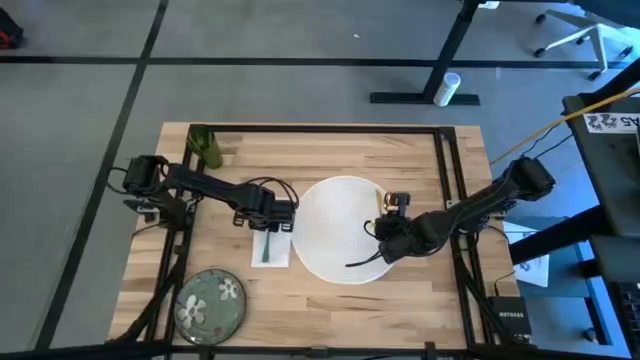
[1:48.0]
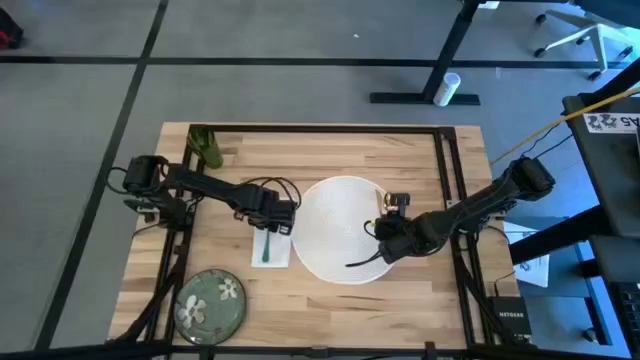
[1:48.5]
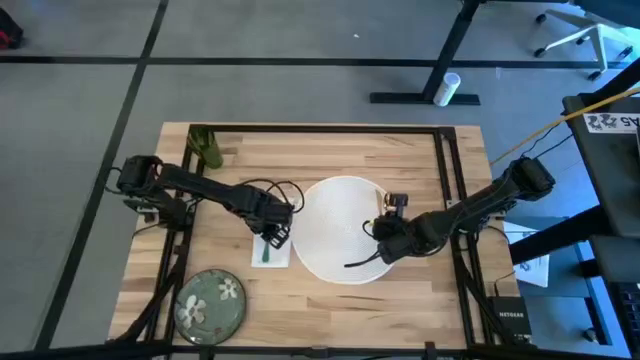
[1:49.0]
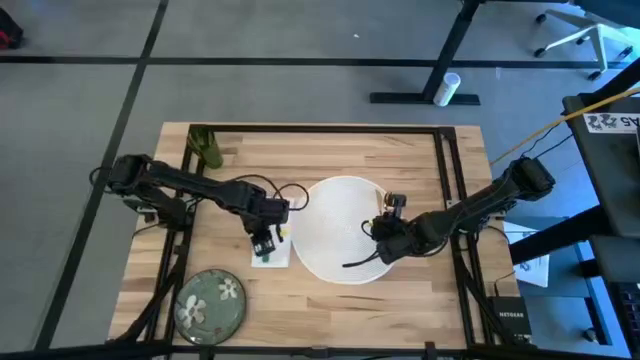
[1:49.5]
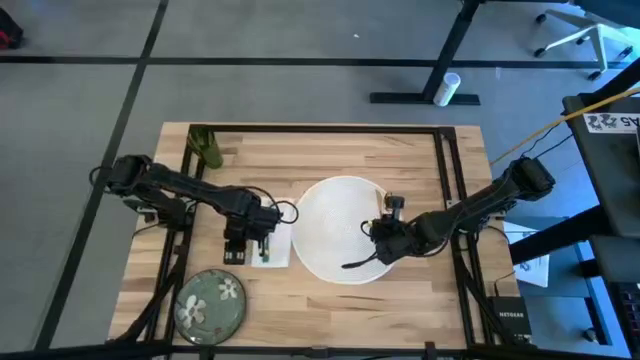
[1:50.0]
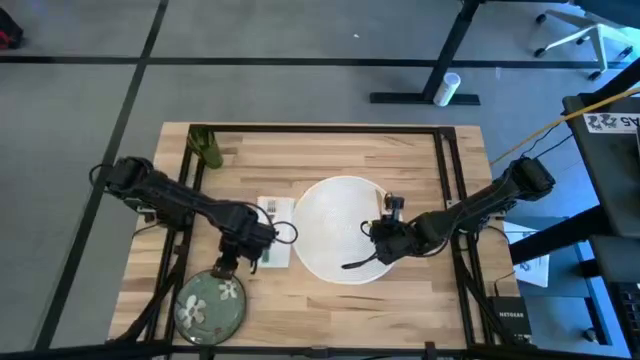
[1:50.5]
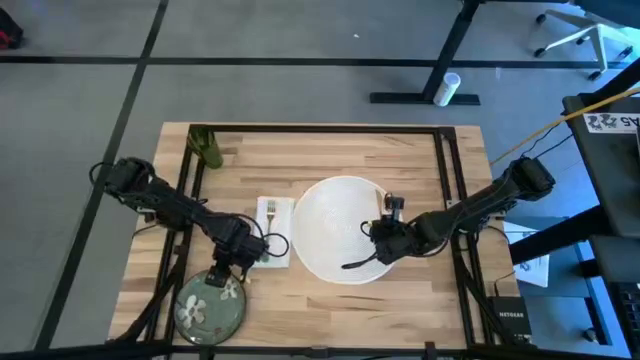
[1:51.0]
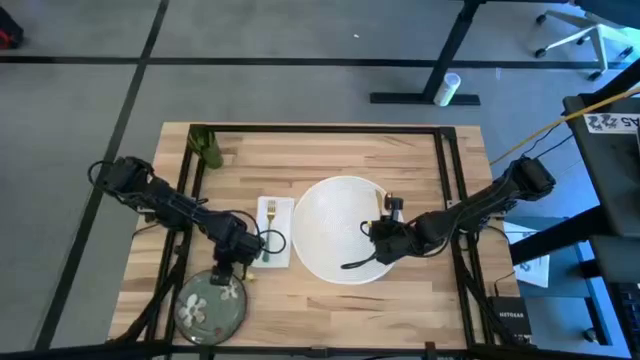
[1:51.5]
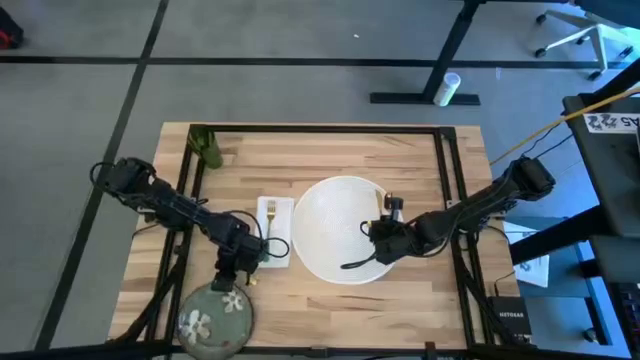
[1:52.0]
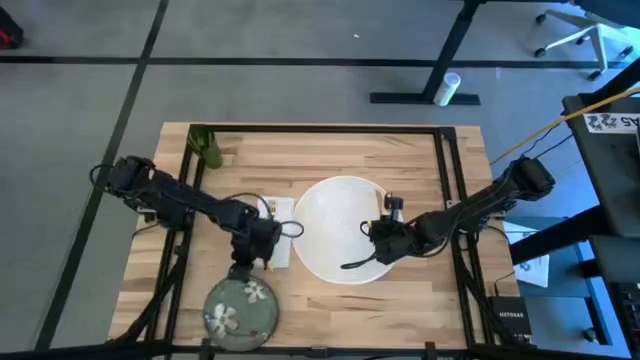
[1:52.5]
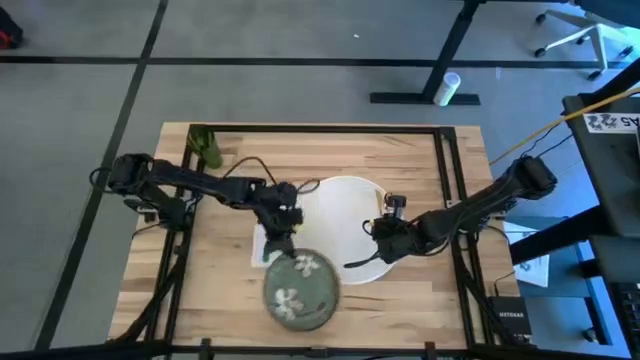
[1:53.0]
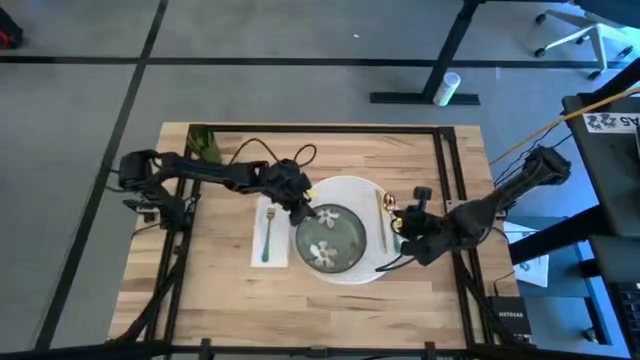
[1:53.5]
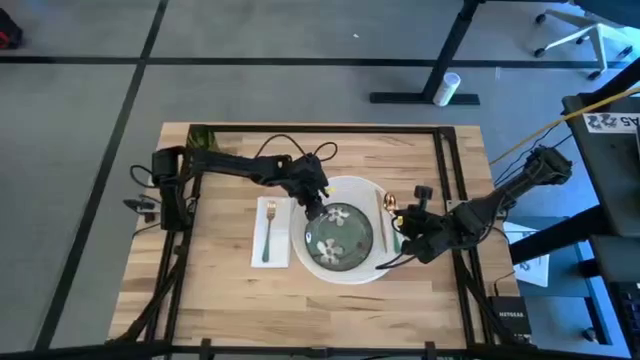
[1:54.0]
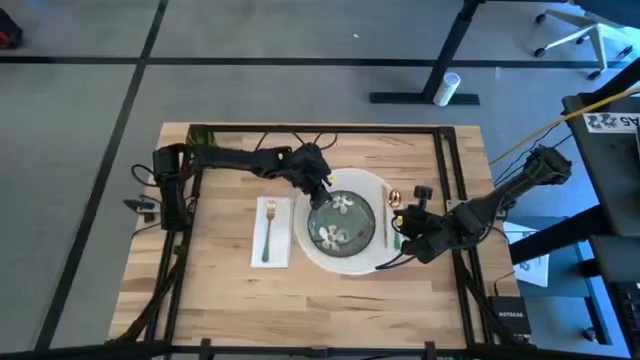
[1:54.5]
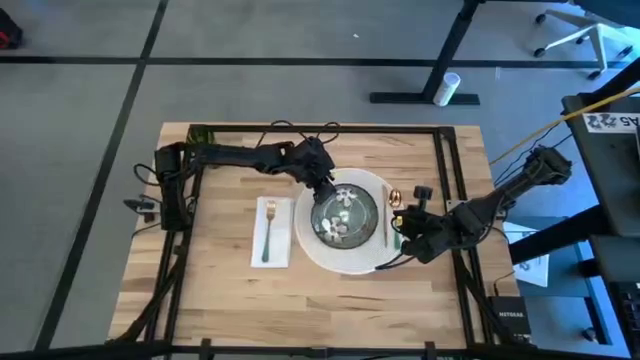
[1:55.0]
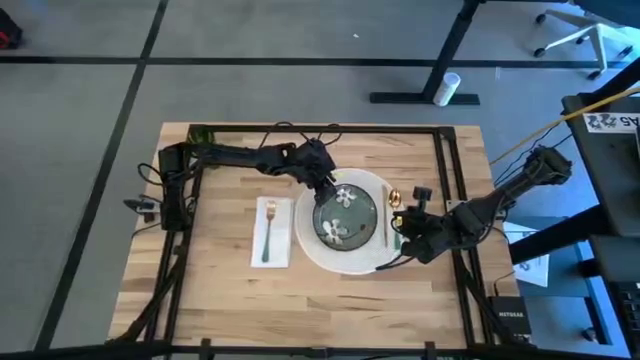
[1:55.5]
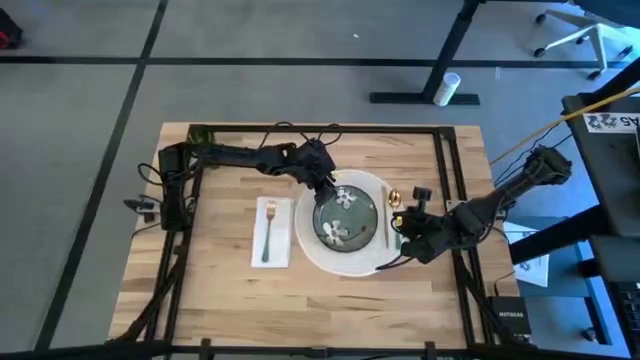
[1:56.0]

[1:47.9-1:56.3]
Task: Set table place
Put the green plate on the white table mat to the left of the gold table knife

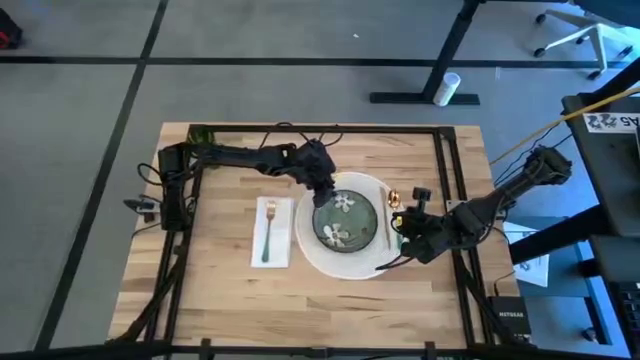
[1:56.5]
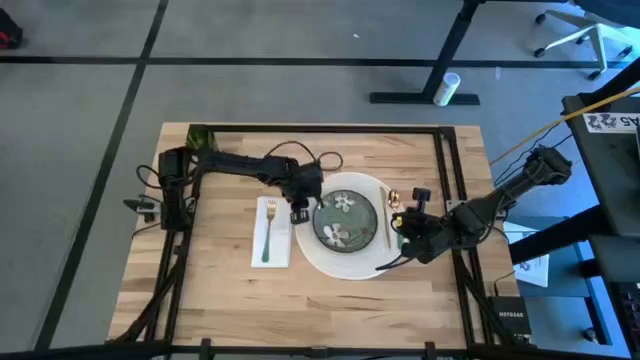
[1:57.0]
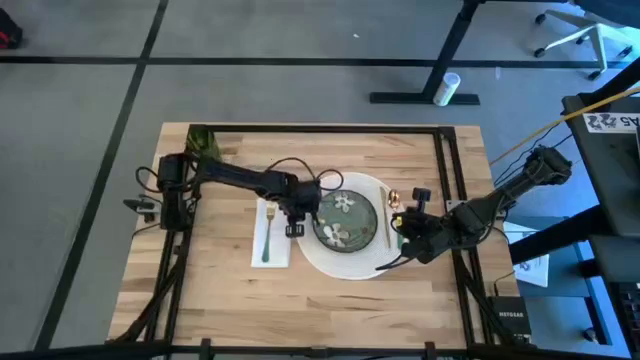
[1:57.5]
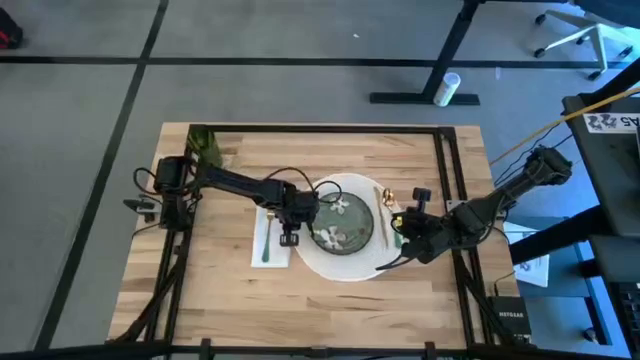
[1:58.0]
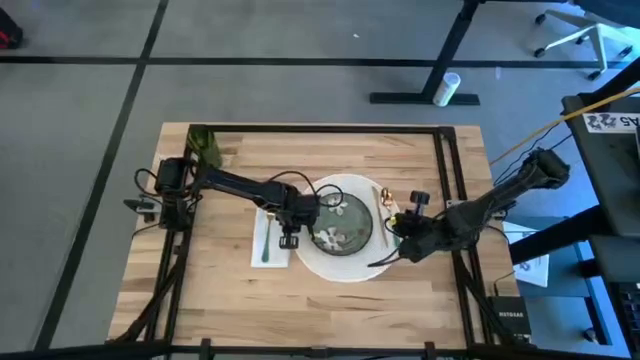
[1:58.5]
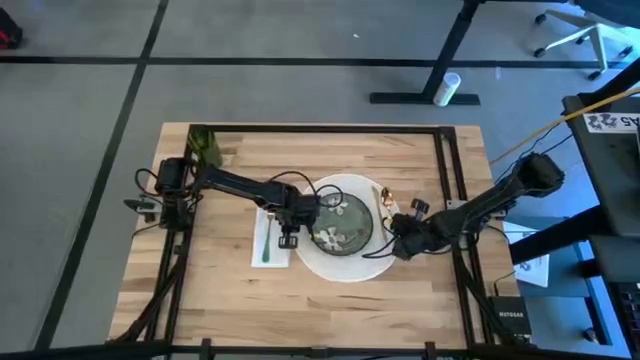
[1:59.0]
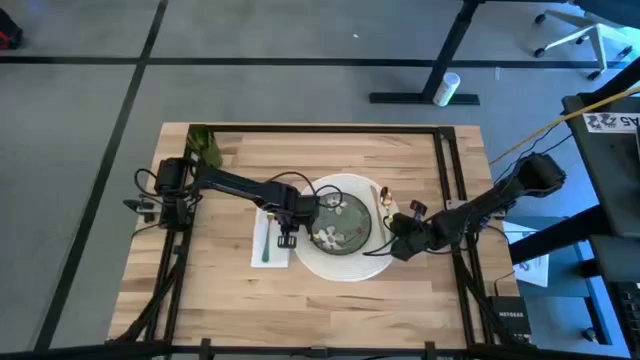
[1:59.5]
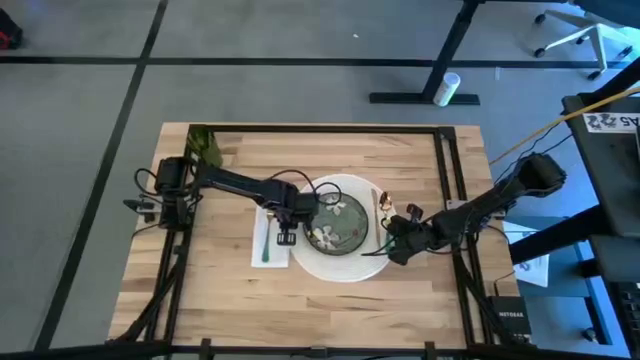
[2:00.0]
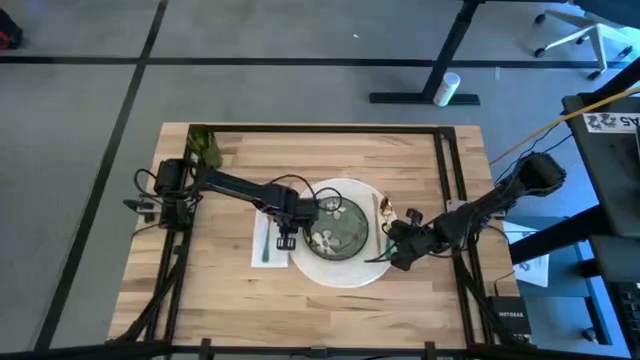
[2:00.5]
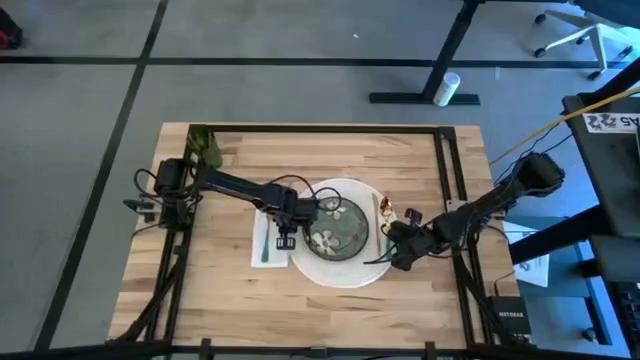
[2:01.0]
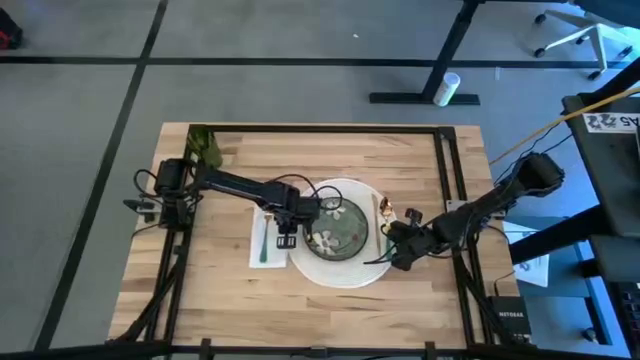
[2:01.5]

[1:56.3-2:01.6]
Adjust the white table mat

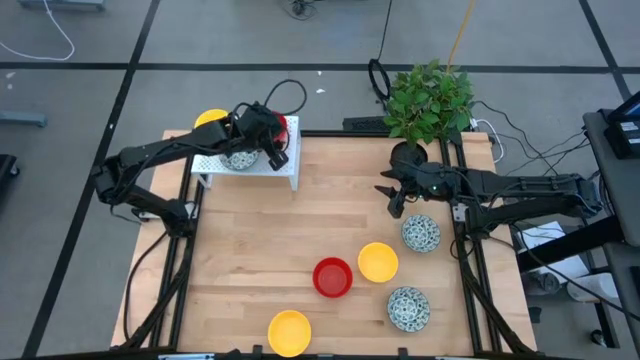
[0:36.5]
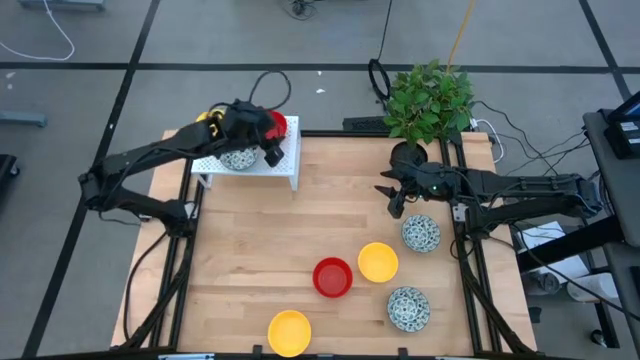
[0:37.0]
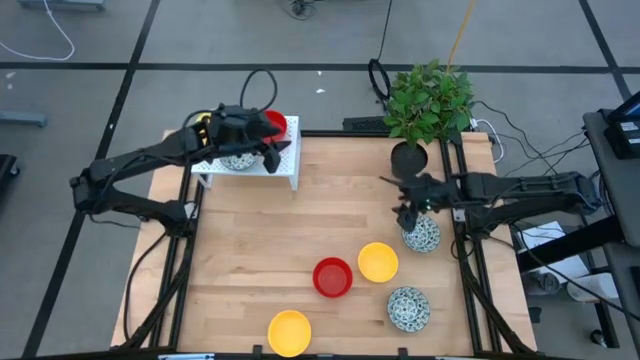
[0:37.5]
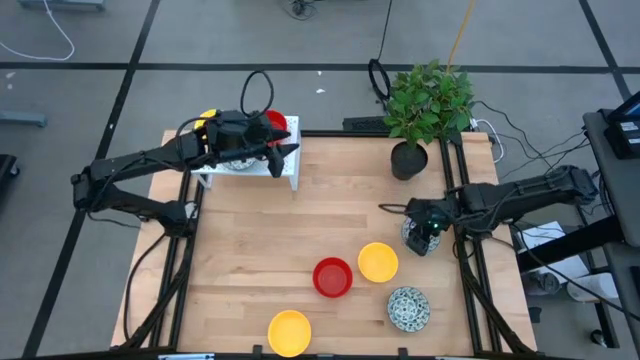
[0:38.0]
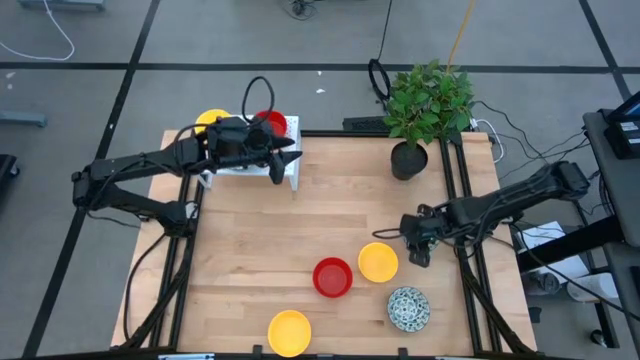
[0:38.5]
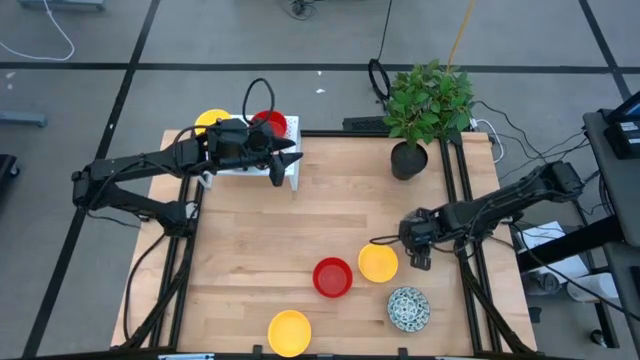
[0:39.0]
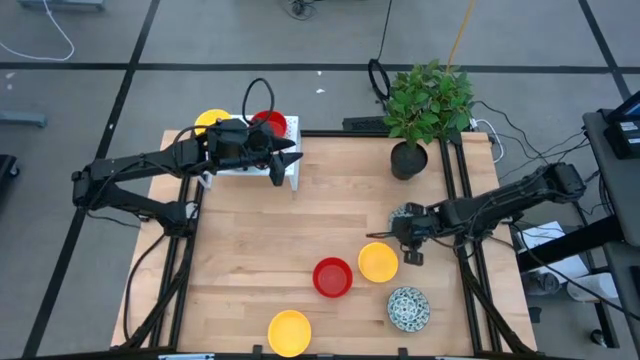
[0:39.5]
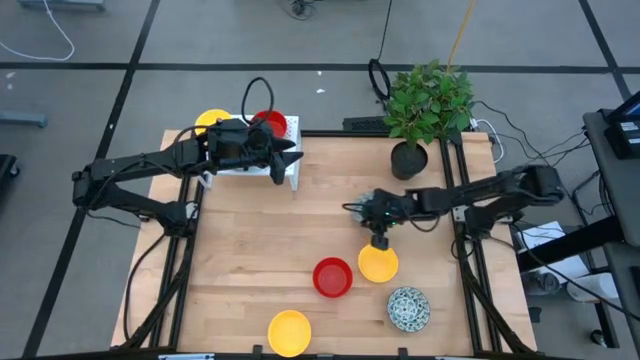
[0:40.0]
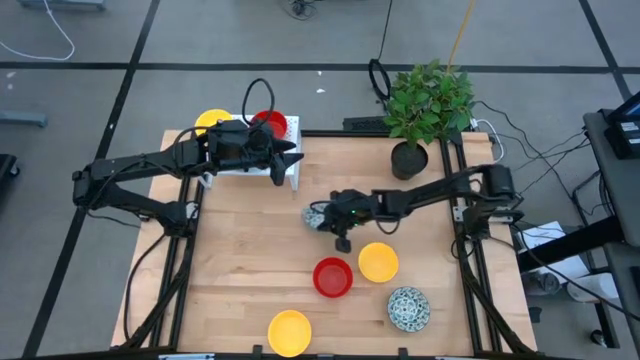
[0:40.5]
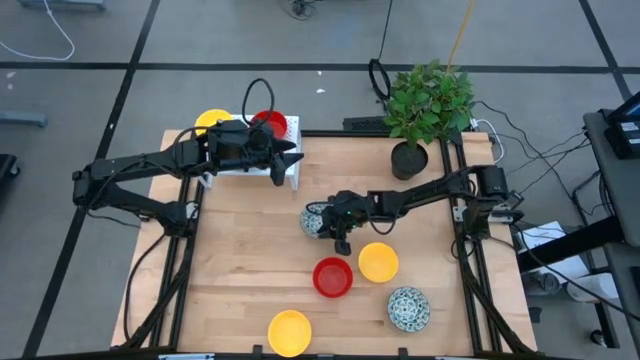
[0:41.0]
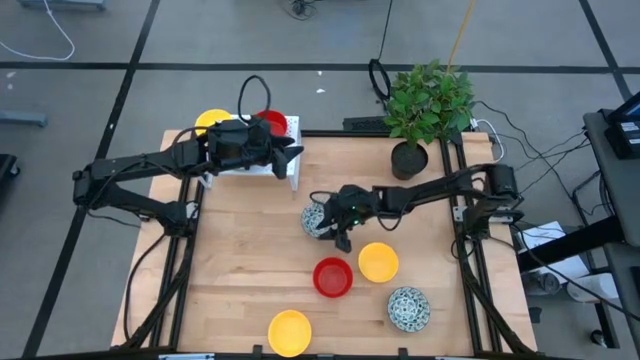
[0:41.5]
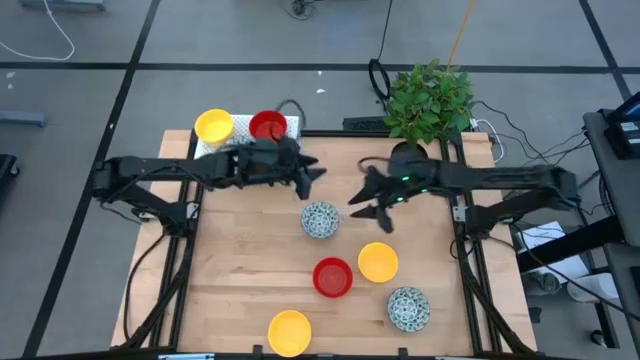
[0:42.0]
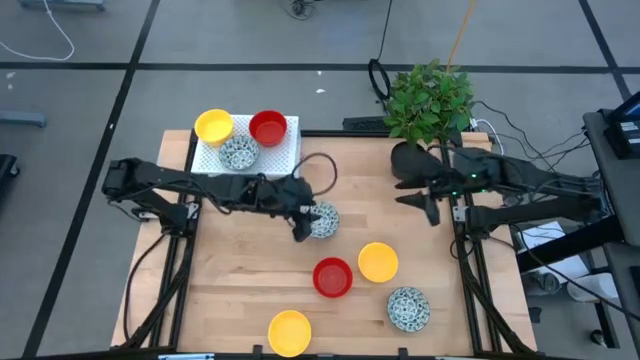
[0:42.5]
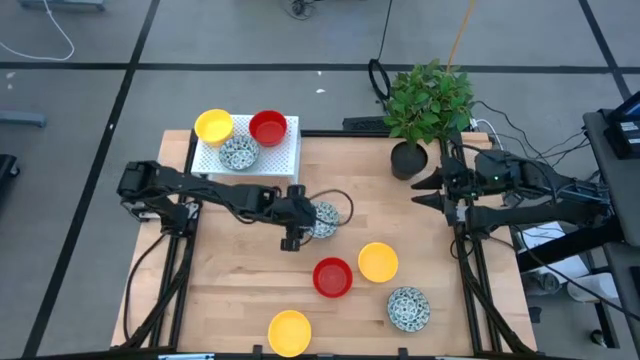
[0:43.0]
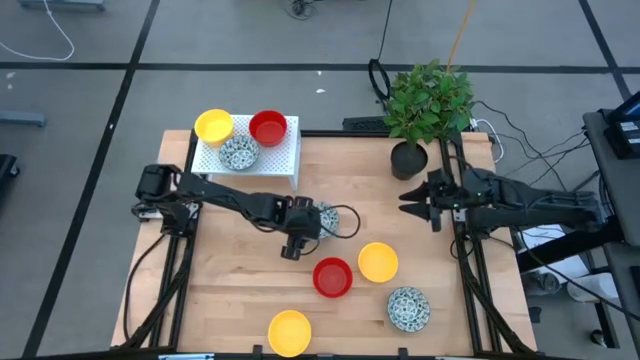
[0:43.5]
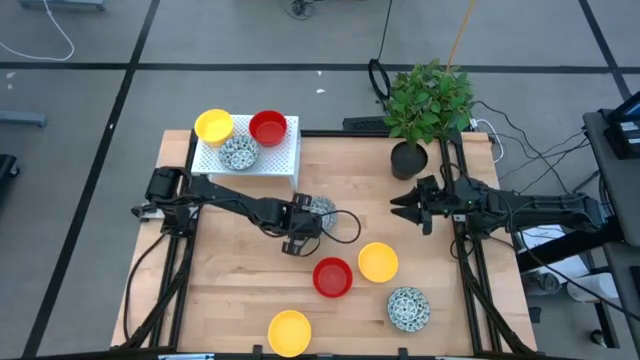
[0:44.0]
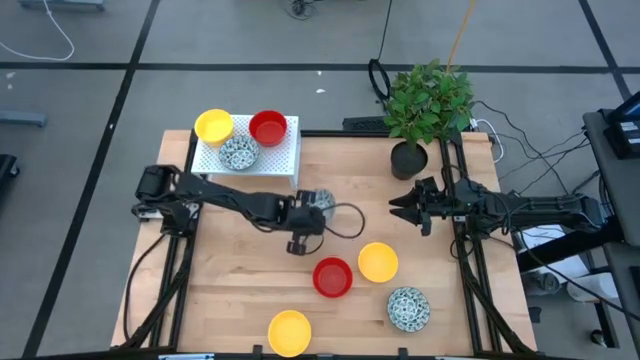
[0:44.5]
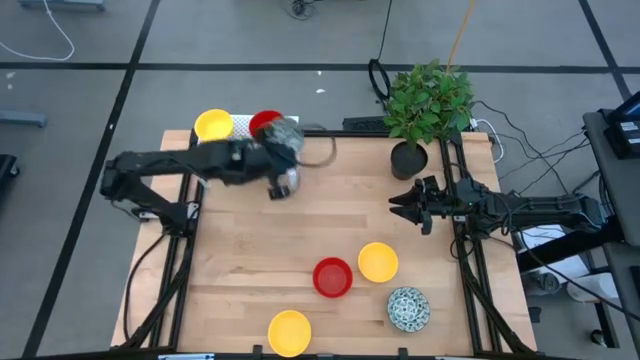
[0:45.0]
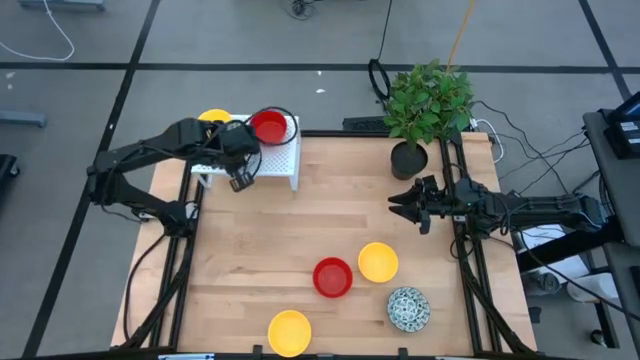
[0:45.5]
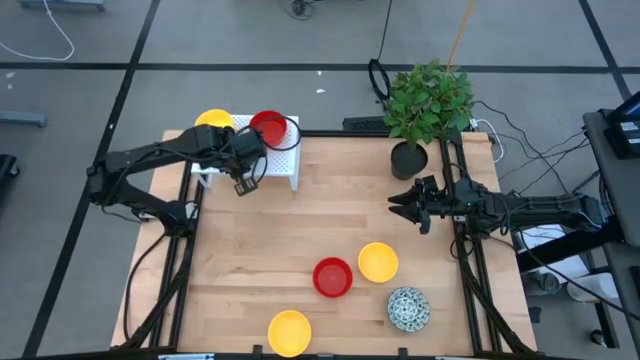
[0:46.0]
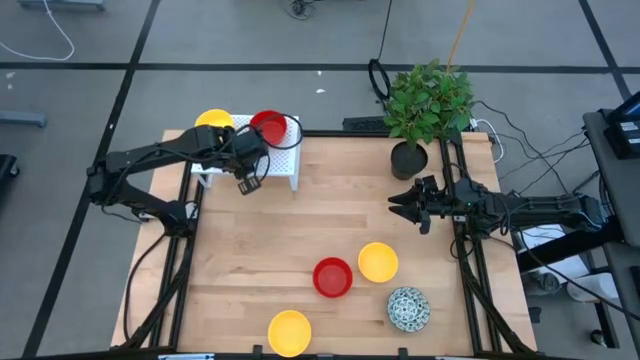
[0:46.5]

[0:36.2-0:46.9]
Task: Pick & Place Mini bowls
Stack the white patterned bowl on the white patterned bowl on the shelf
